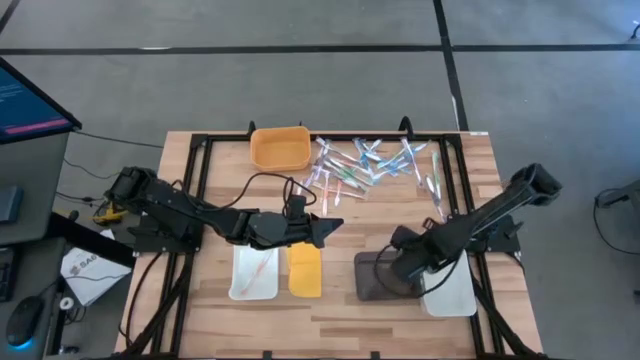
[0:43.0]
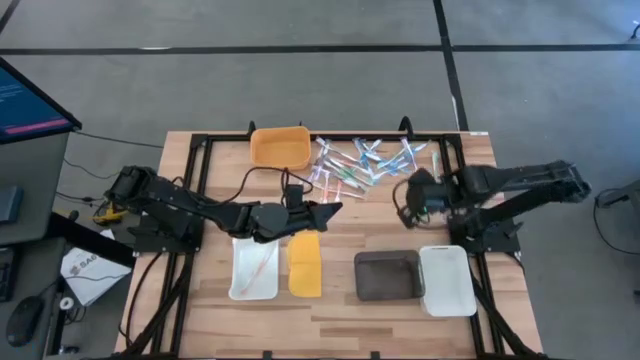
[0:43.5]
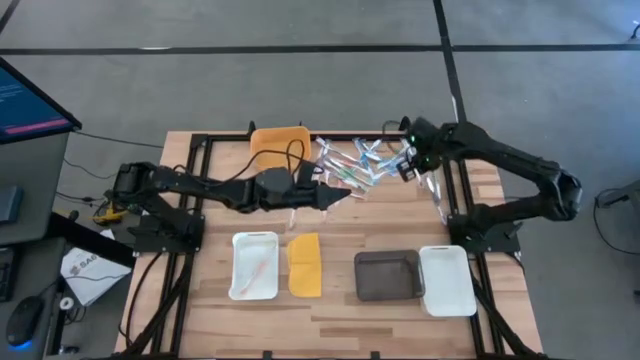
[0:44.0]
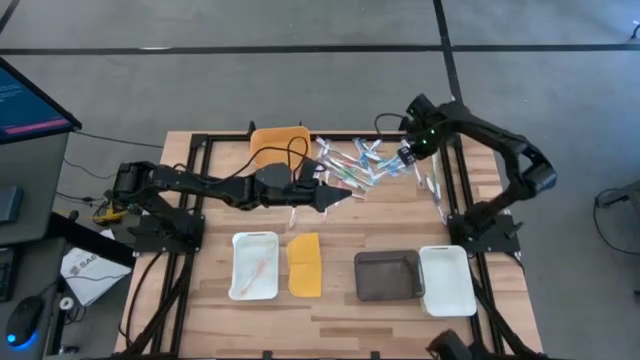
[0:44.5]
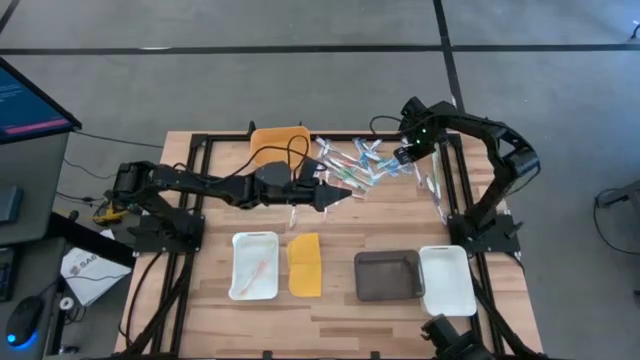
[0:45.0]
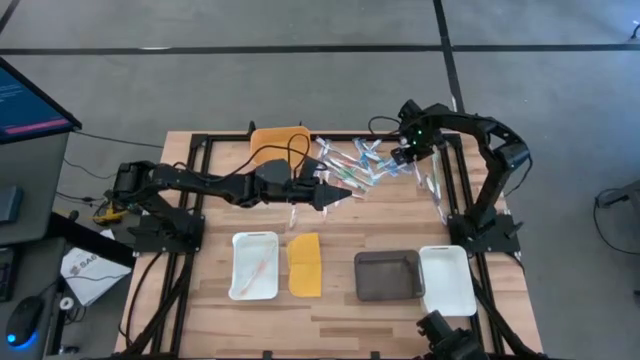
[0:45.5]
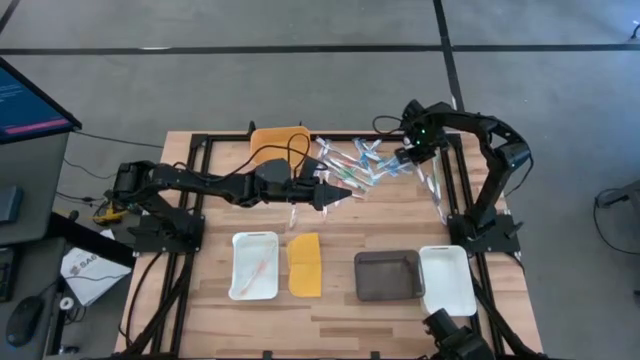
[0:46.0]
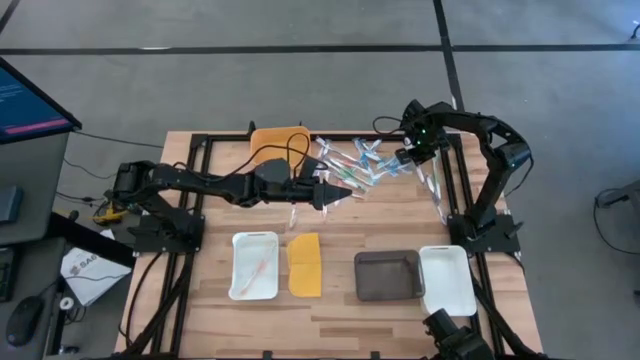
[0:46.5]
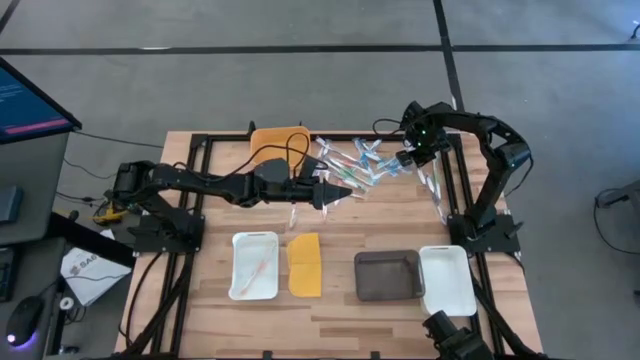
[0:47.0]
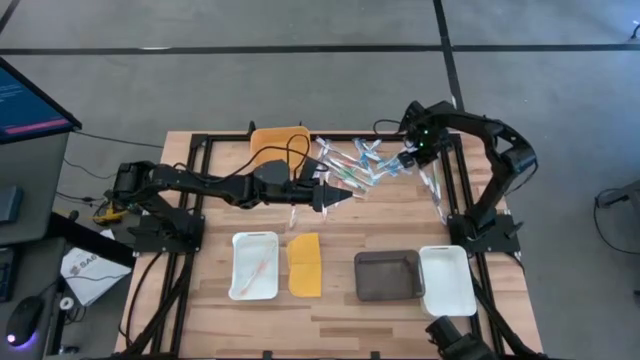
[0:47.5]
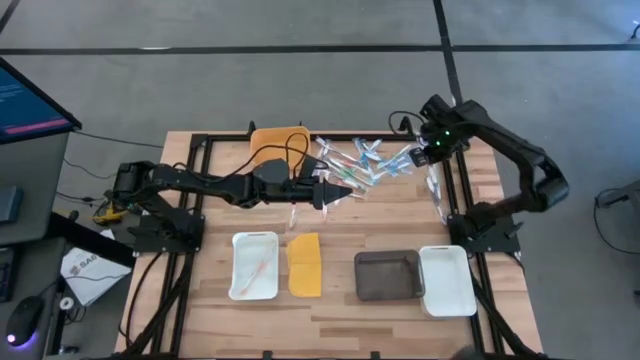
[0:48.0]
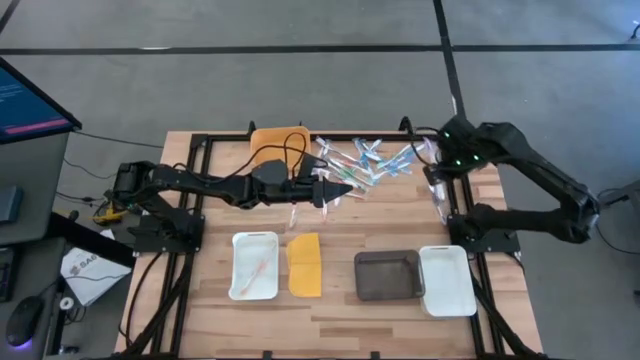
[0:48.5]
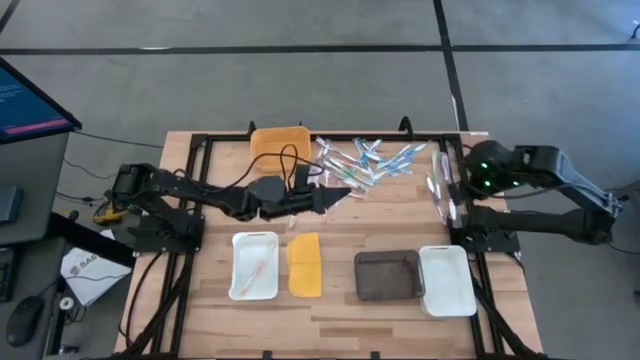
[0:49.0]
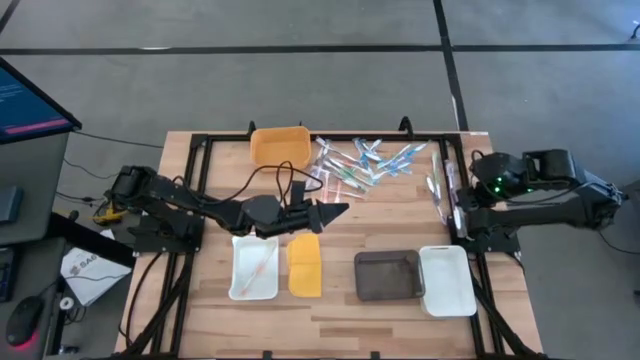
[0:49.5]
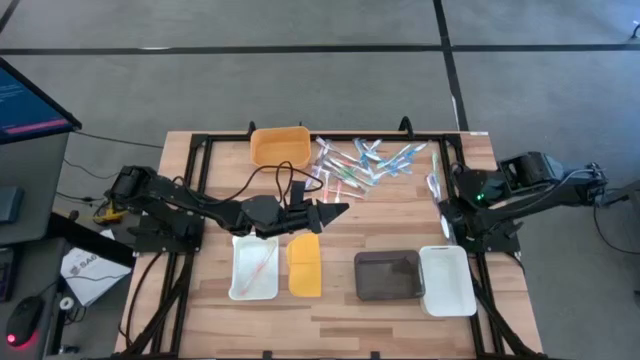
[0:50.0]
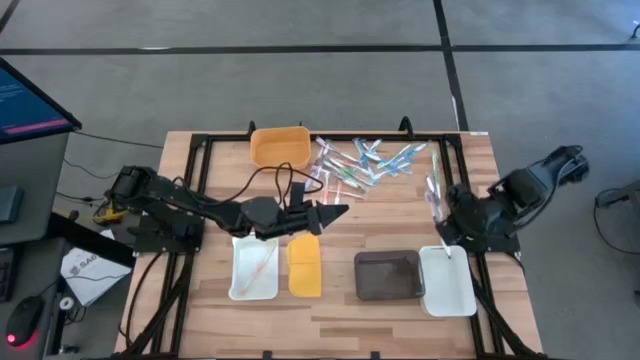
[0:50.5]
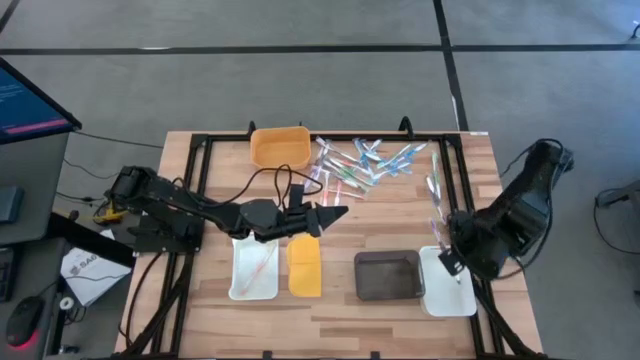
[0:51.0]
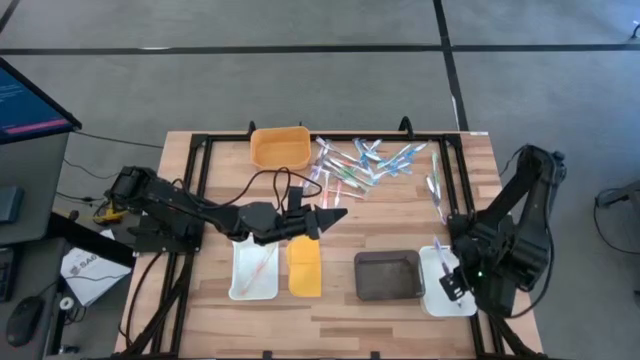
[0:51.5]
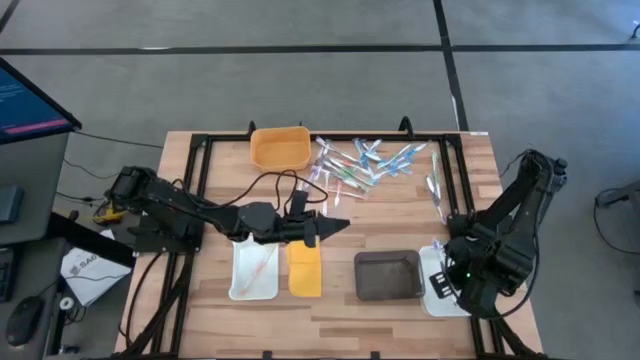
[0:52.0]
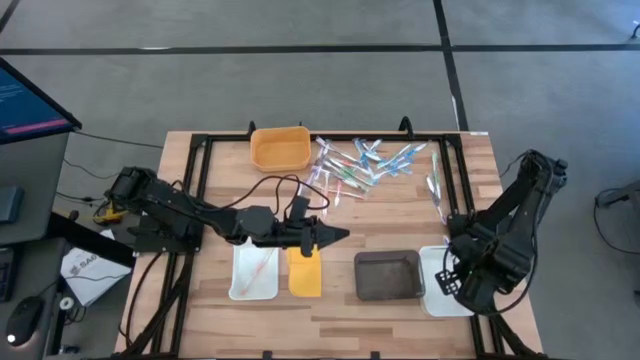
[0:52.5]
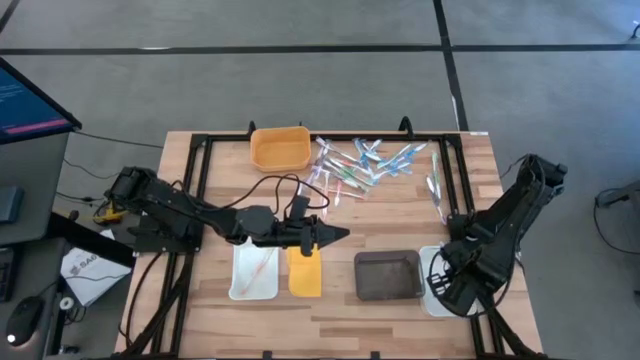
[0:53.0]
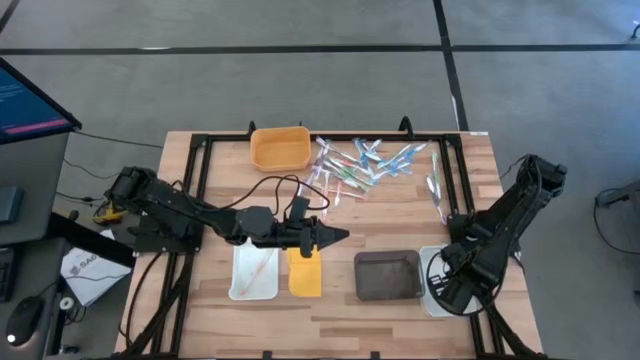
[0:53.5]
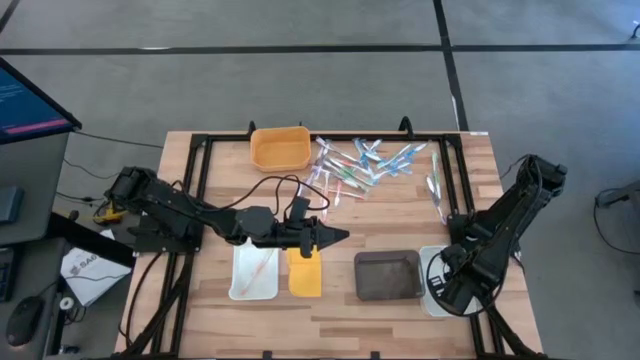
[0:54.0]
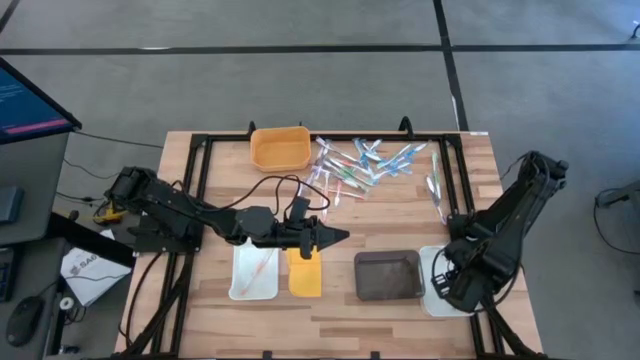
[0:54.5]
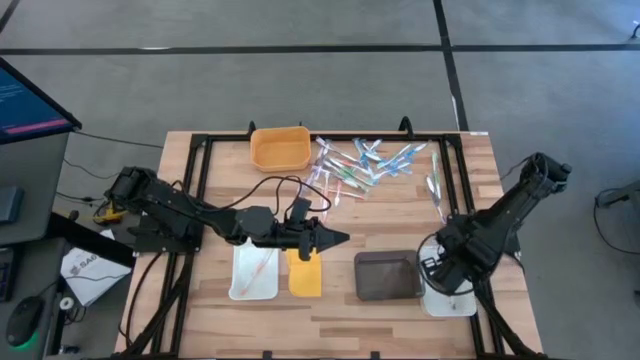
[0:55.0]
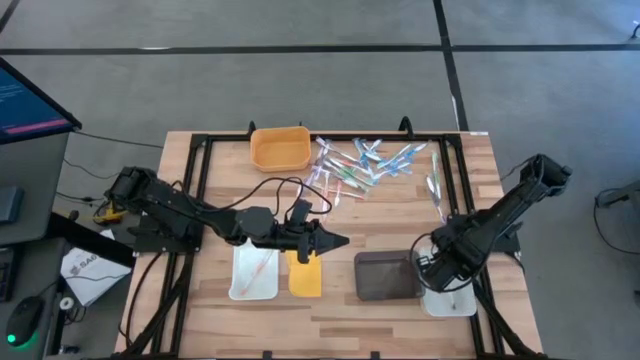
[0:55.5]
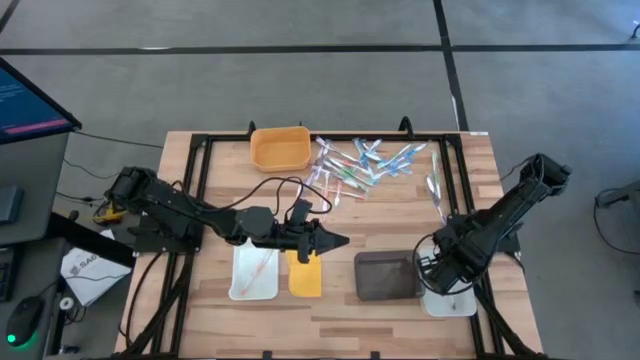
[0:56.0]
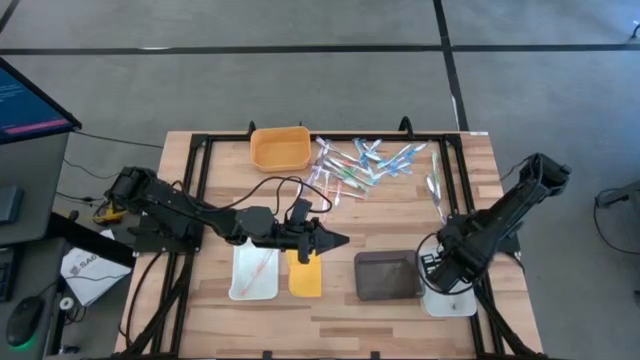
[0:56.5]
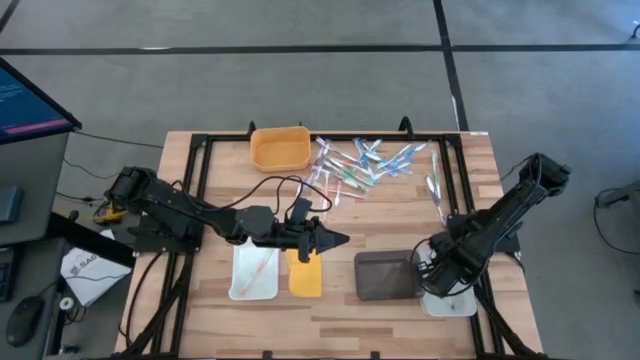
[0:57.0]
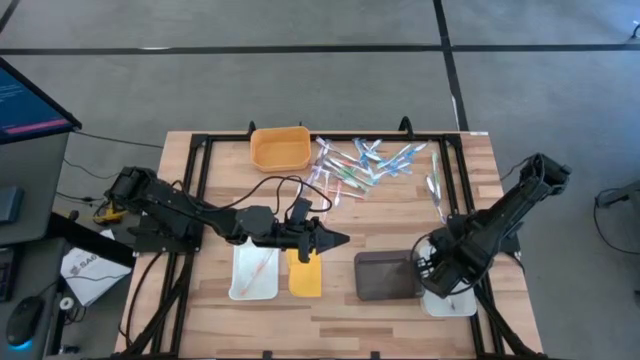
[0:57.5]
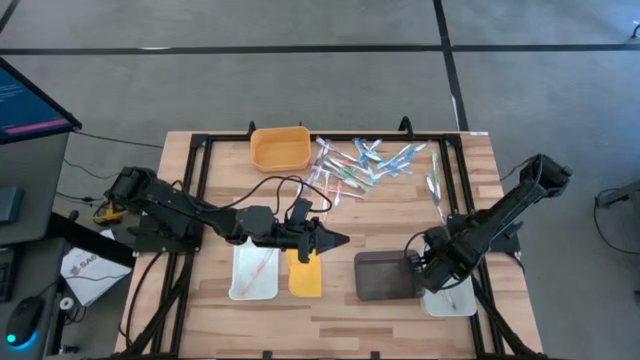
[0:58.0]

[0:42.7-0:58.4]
Task: Pick & Place Toothbrushes
Put the purple toothbrush into the right white bin

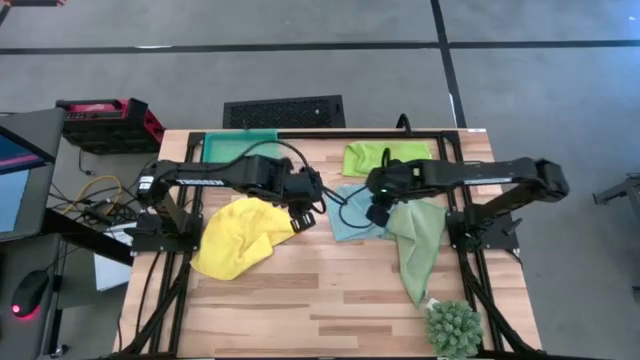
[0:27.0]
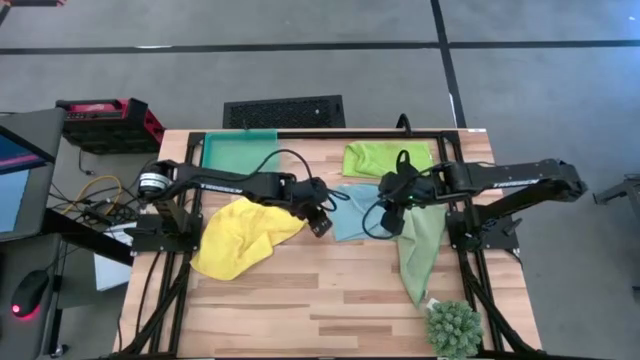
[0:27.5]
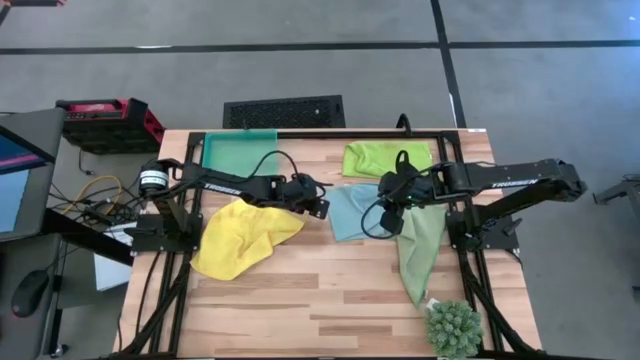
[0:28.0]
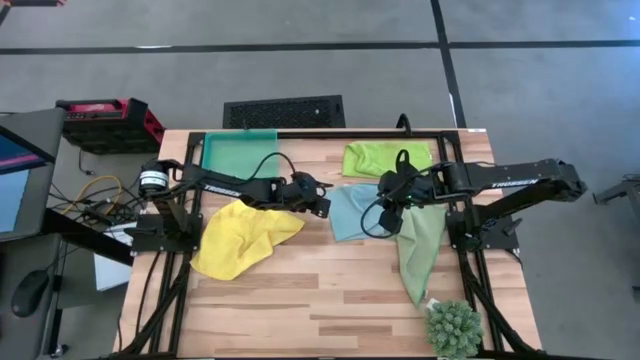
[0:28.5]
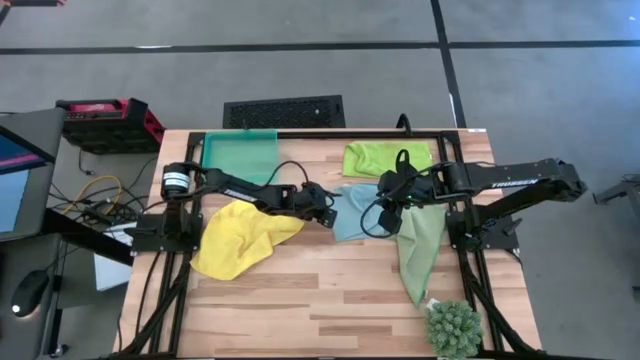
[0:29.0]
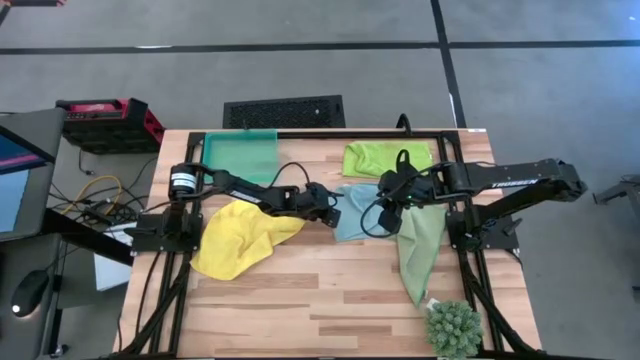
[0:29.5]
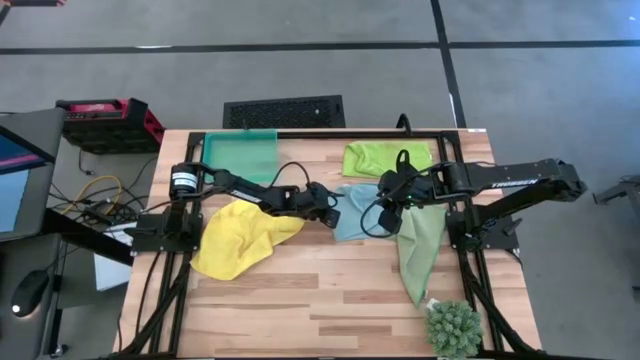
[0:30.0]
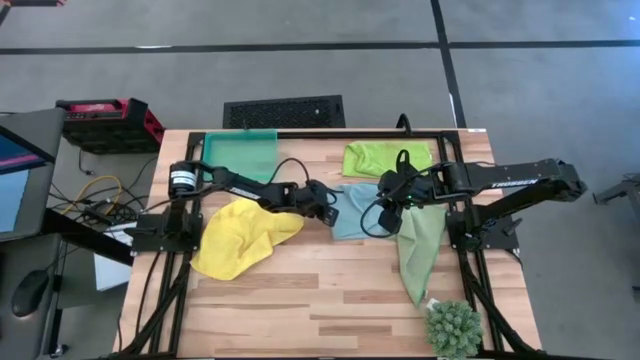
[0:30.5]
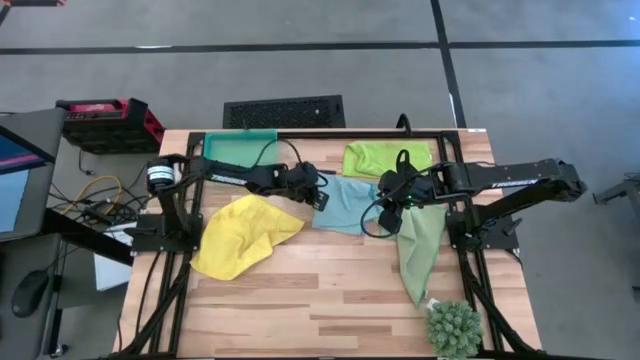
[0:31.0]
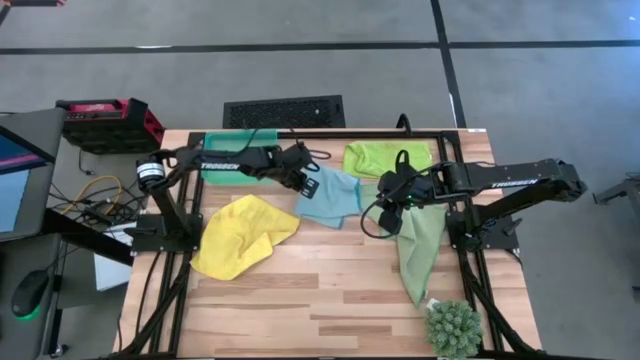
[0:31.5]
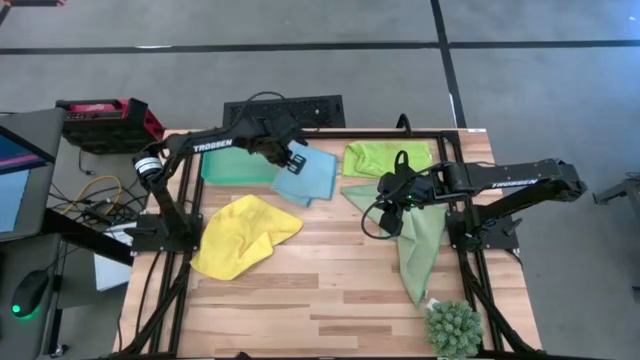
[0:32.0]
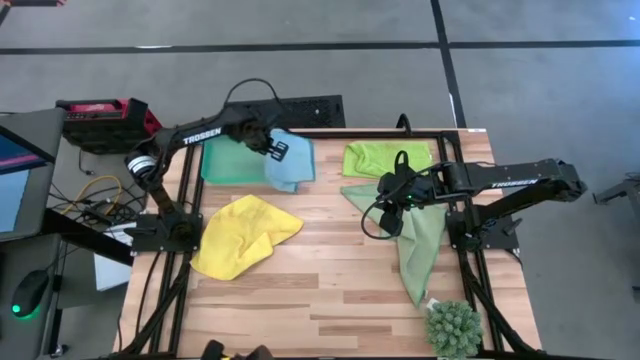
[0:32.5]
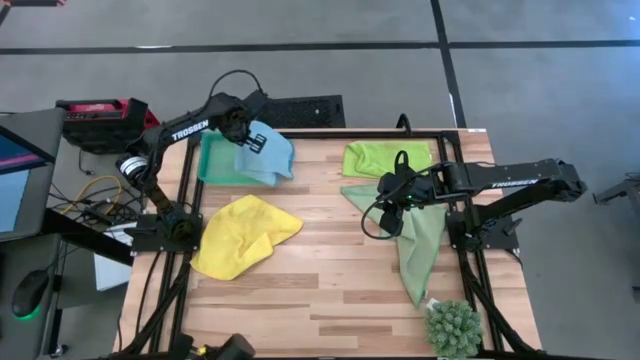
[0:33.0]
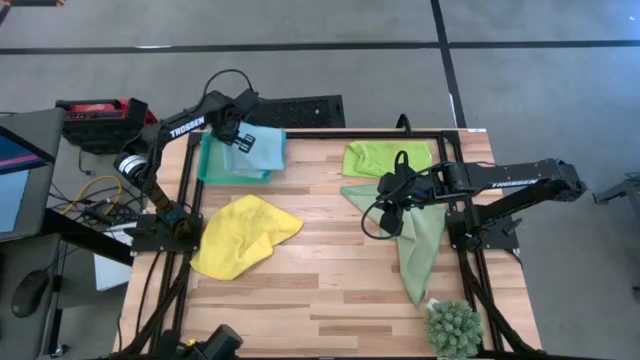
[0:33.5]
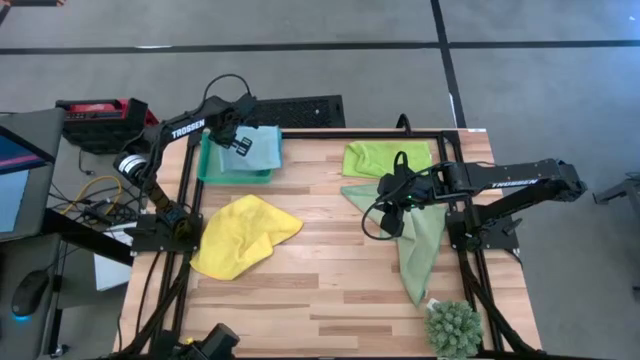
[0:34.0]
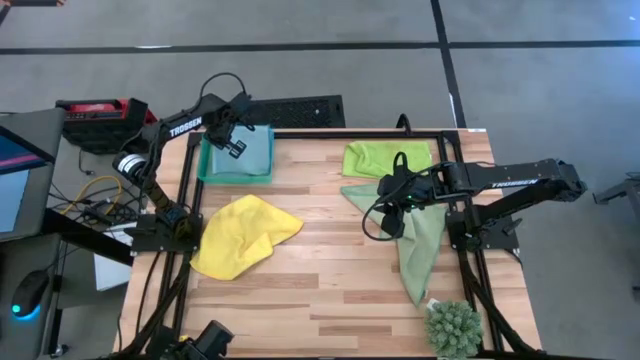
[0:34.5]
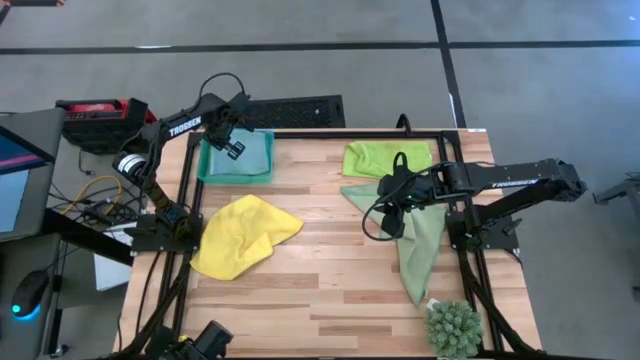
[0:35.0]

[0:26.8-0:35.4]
Task: Fold microfiber towels
Put the folded blue microfiber towel into the green bin
